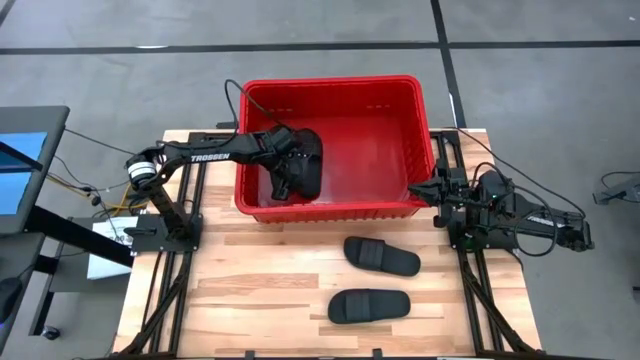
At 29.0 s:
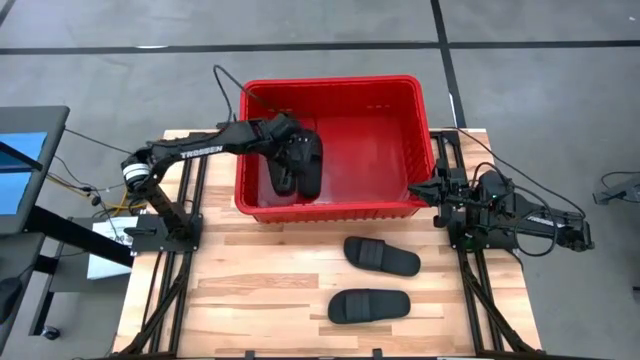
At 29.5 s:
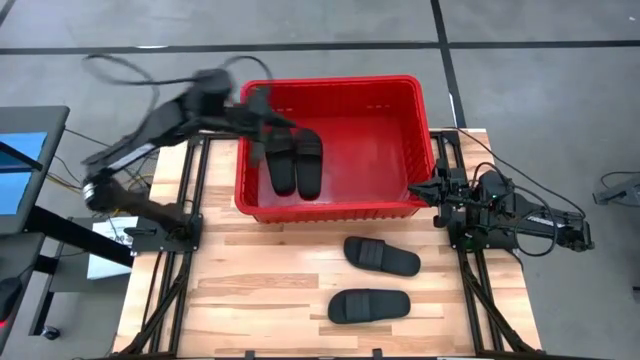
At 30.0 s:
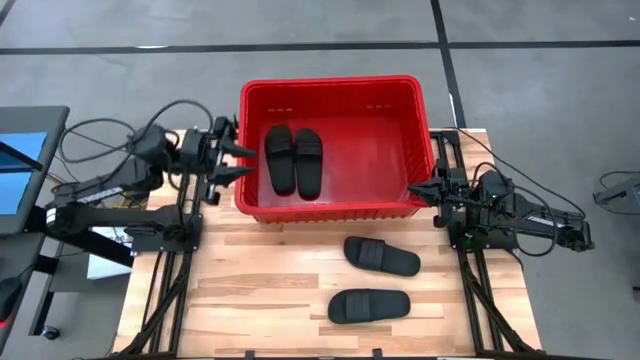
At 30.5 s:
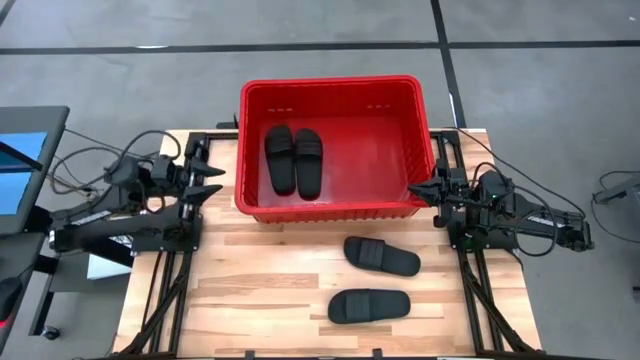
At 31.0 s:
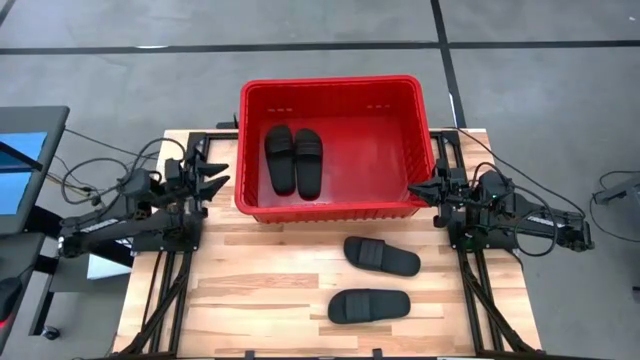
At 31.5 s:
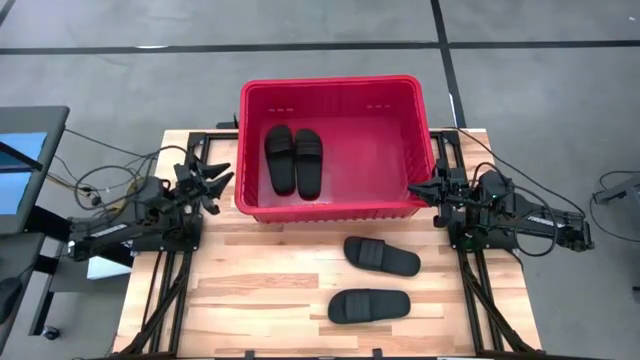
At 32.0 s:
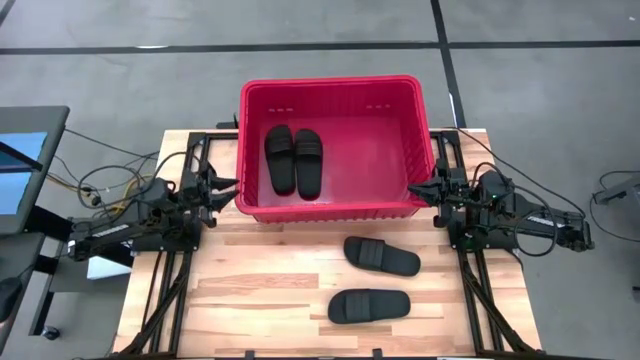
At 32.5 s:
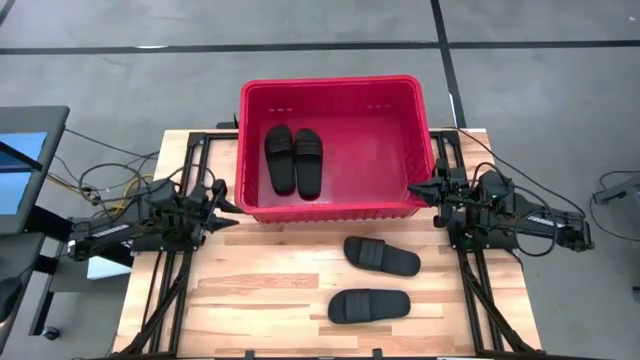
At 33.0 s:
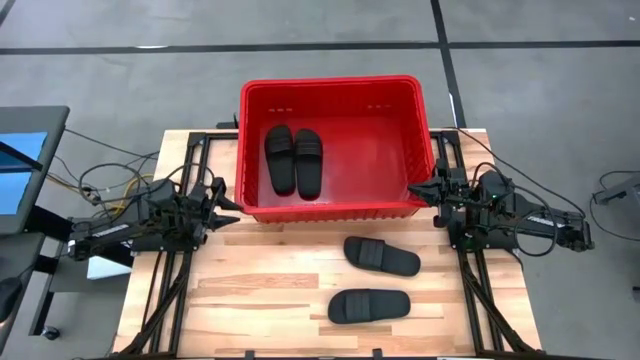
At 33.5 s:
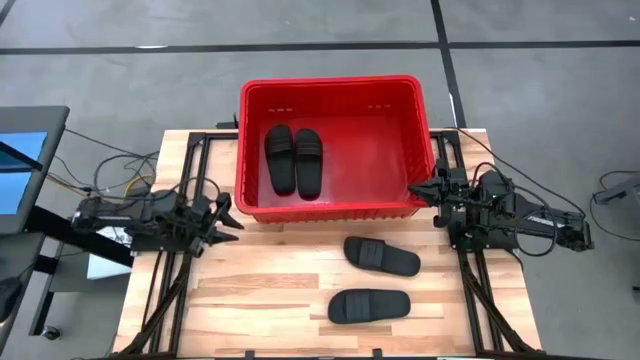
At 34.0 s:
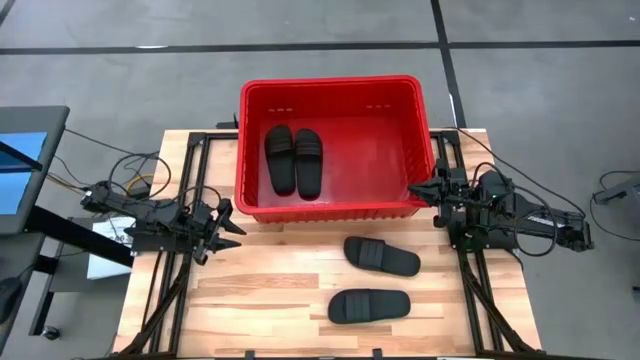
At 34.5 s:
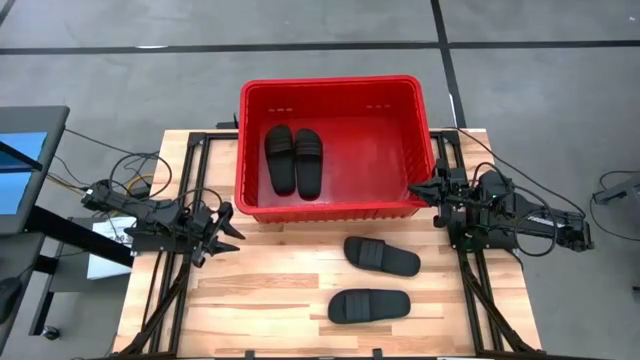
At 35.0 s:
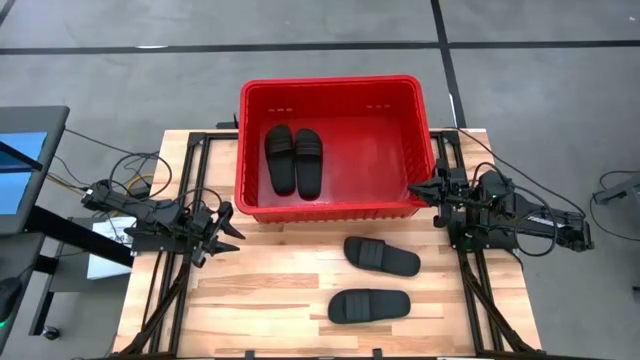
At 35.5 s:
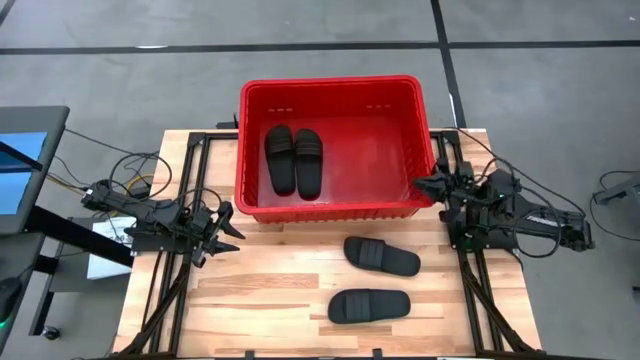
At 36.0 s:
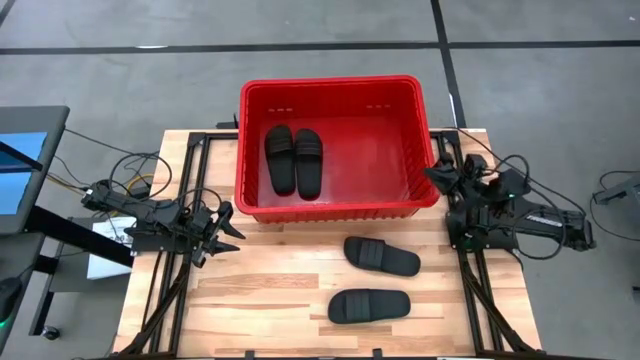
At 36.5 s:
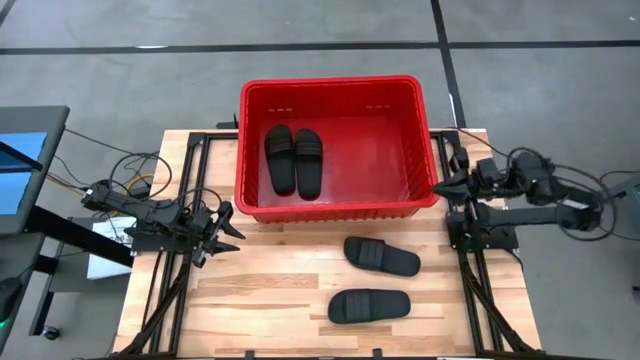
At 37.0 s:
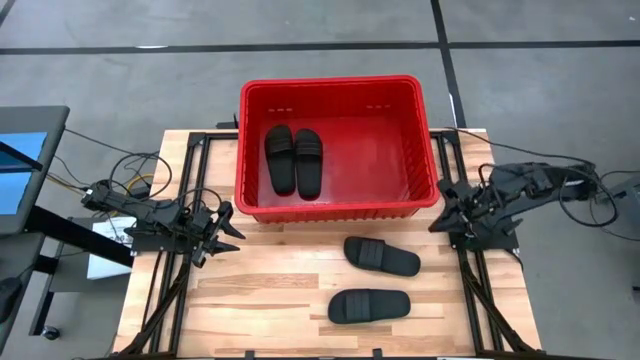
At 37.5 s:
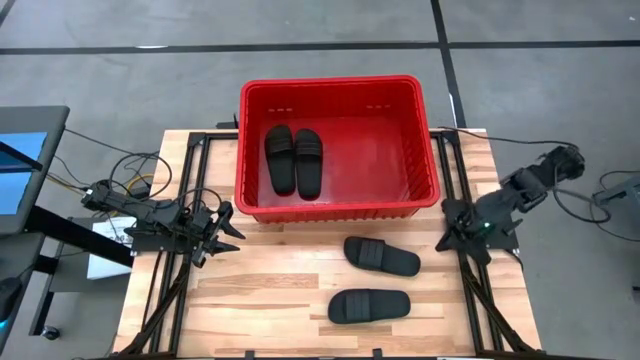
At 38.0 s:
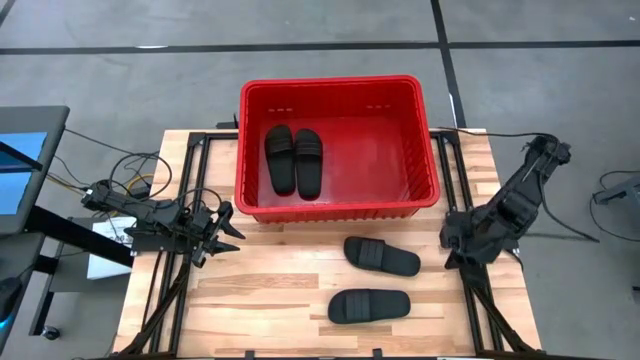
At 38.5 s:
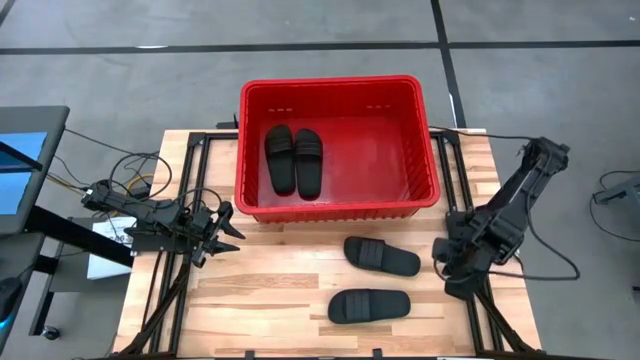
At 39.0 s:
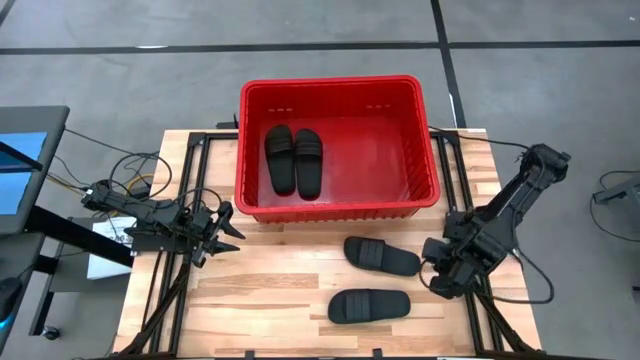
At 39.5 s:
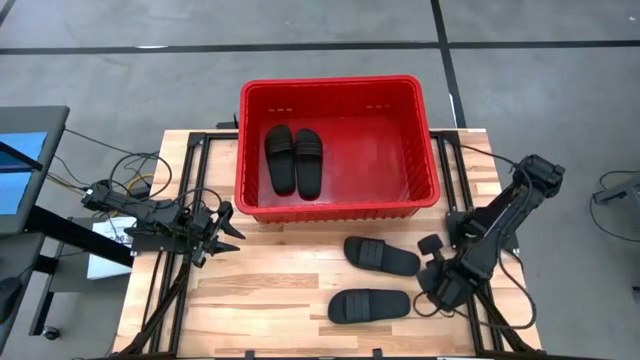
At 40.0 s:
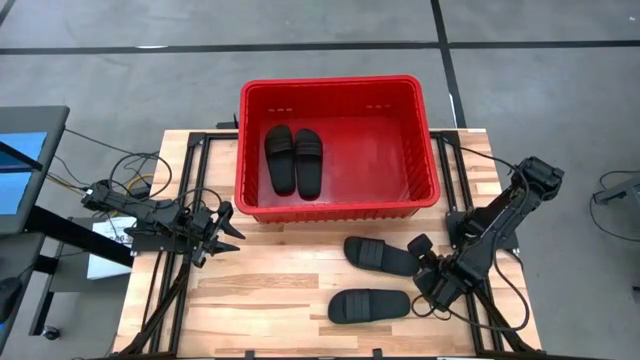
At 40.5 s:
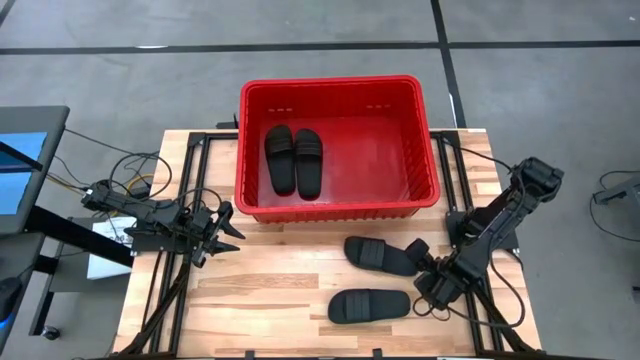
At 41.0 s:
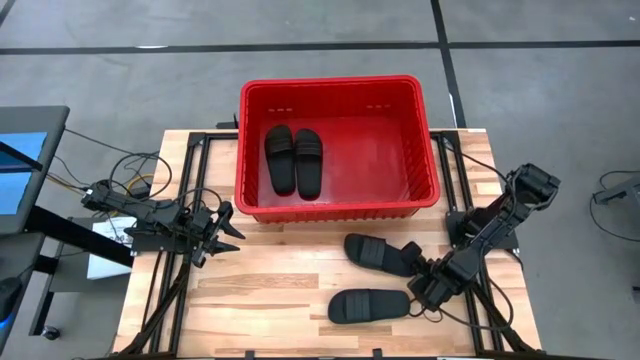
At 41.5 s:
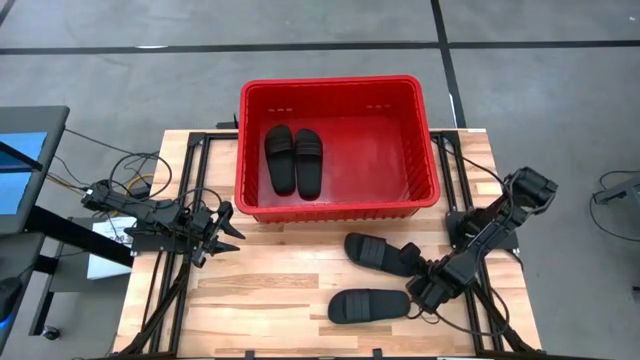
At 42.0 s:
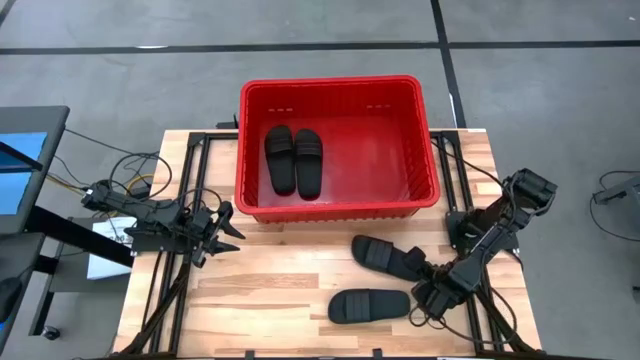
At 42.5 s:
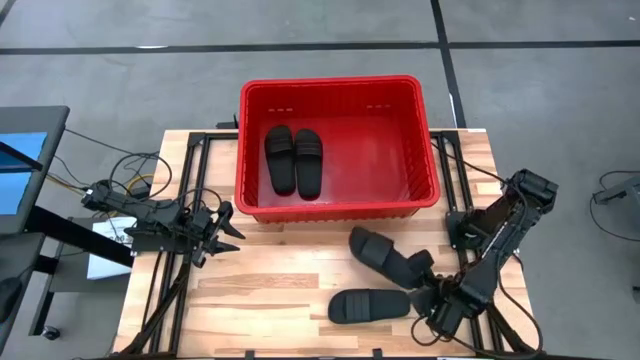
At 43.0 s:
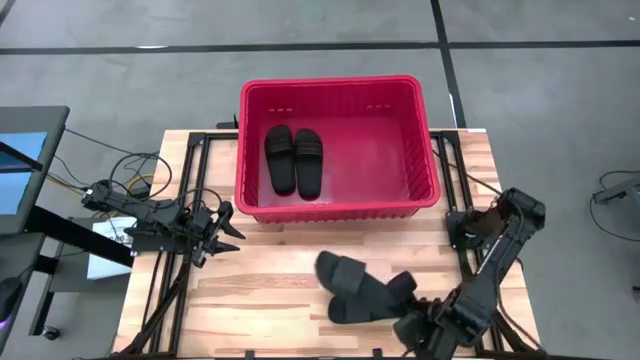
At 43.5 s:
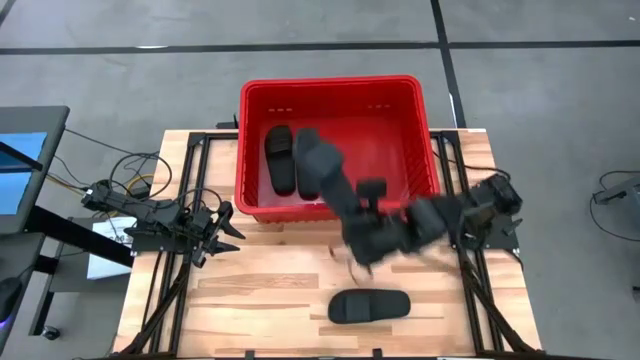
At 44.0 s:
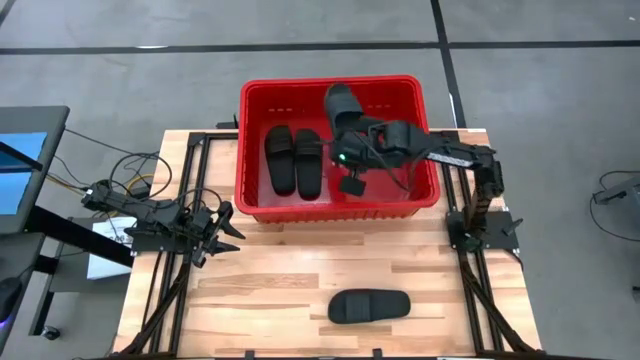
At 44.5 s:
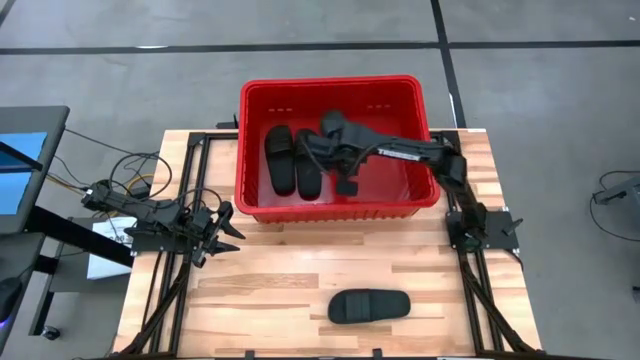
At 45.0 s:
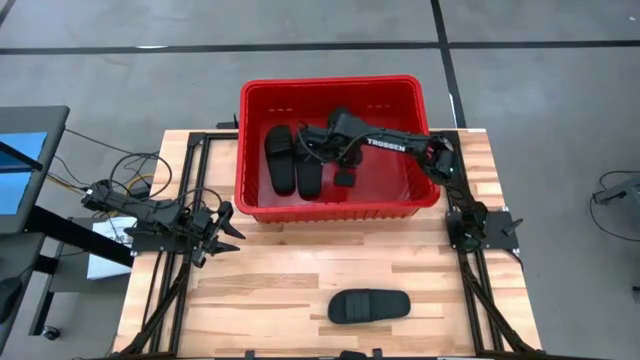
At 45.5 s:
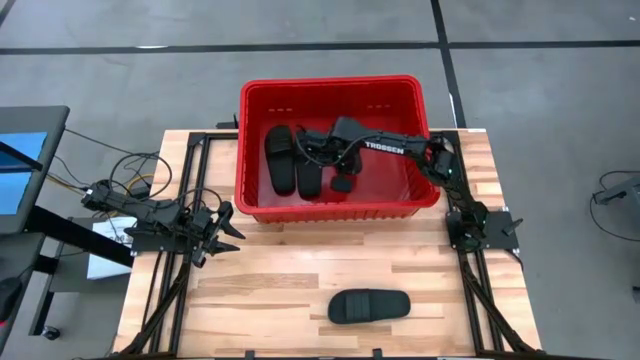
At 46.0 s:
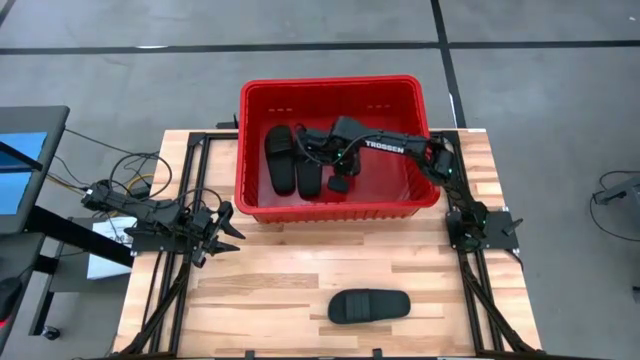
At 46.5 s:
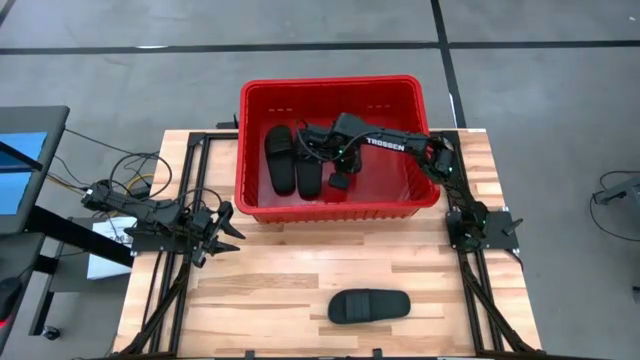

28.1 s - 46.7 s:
Task: Pick and place slides into bin
Put the black slipper into the bin
